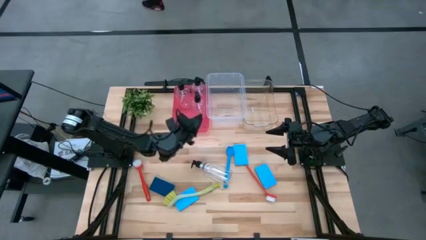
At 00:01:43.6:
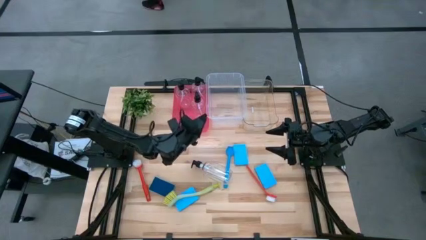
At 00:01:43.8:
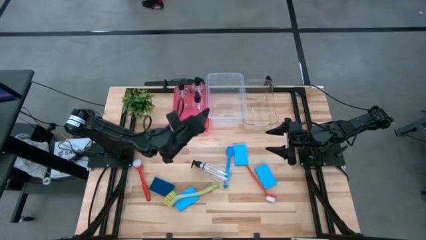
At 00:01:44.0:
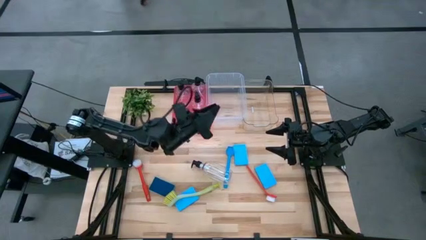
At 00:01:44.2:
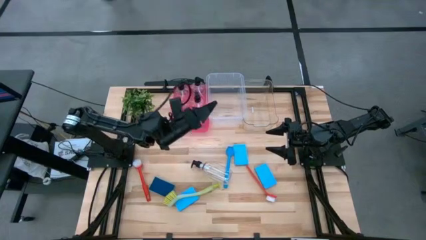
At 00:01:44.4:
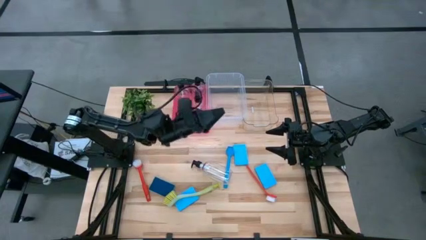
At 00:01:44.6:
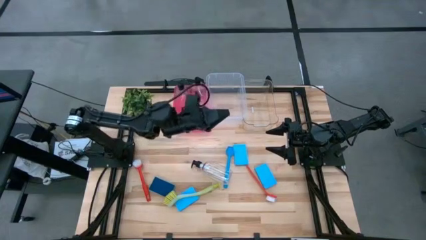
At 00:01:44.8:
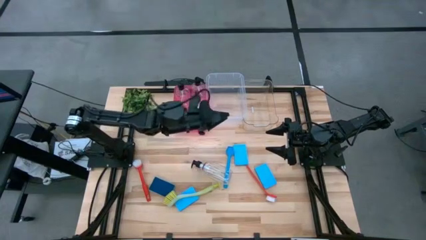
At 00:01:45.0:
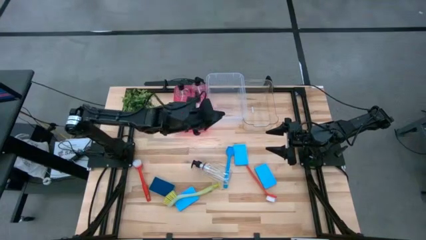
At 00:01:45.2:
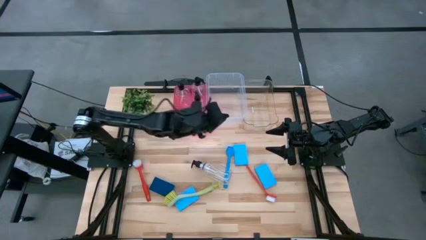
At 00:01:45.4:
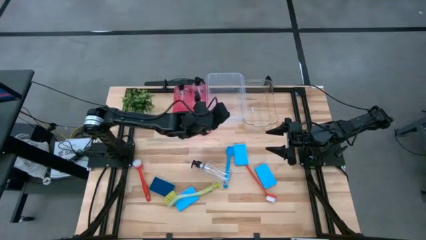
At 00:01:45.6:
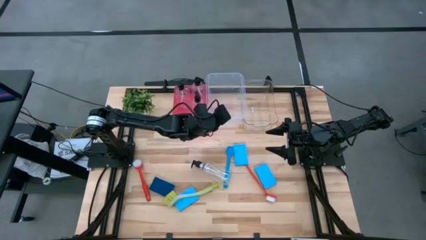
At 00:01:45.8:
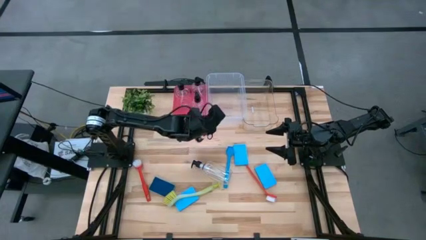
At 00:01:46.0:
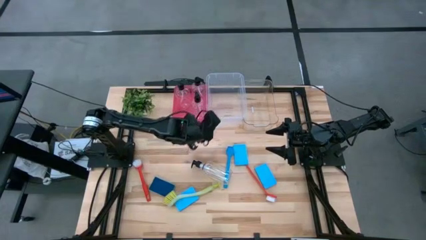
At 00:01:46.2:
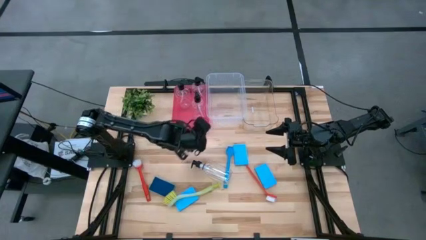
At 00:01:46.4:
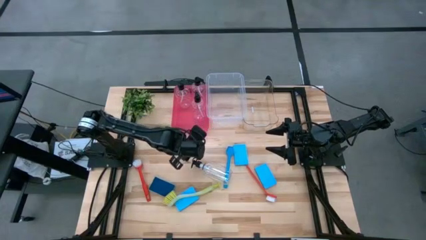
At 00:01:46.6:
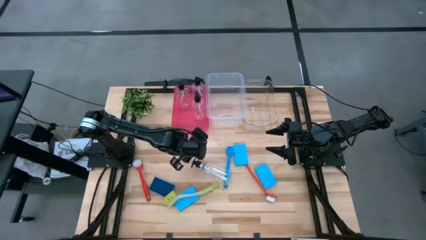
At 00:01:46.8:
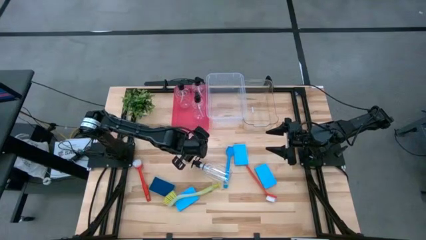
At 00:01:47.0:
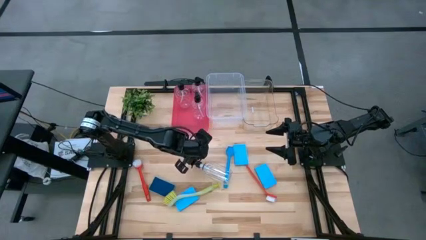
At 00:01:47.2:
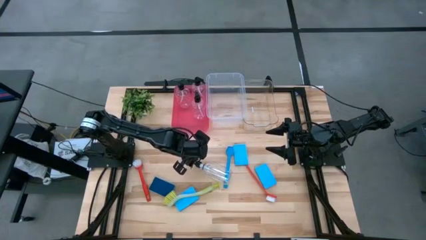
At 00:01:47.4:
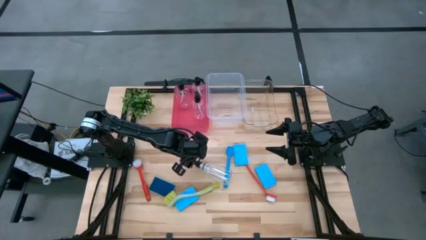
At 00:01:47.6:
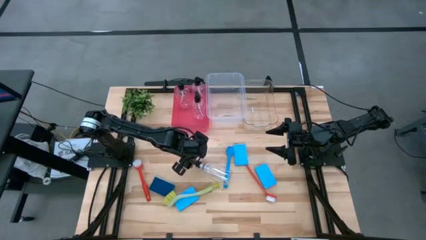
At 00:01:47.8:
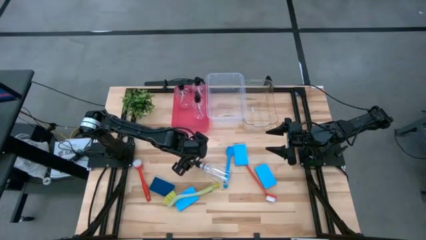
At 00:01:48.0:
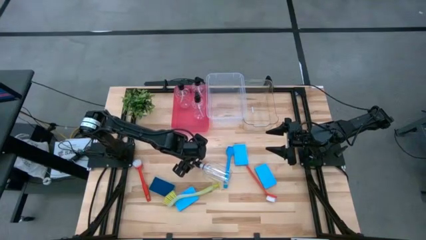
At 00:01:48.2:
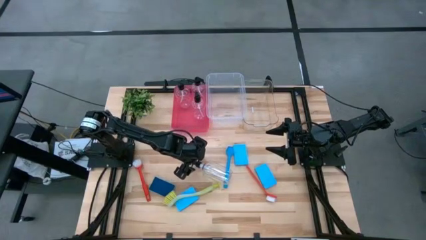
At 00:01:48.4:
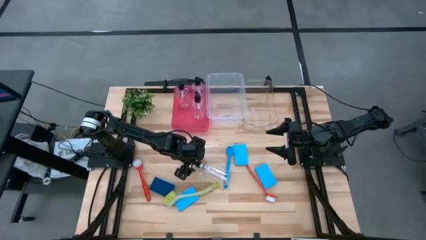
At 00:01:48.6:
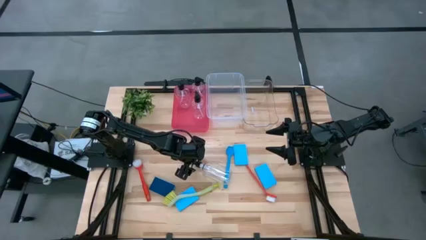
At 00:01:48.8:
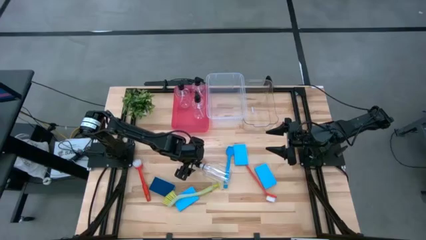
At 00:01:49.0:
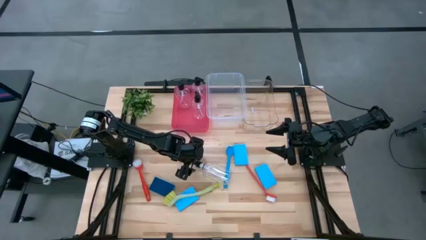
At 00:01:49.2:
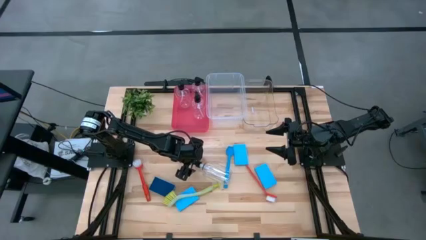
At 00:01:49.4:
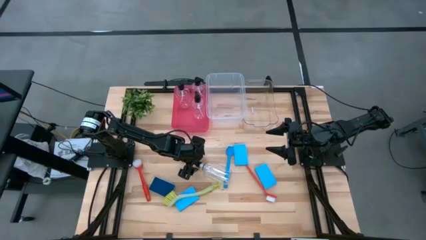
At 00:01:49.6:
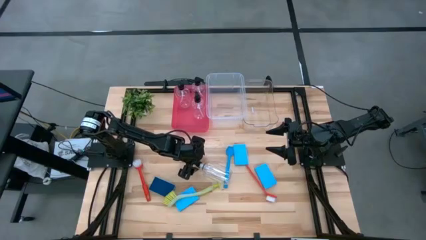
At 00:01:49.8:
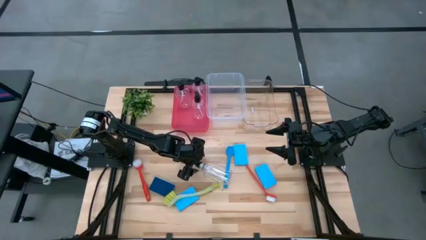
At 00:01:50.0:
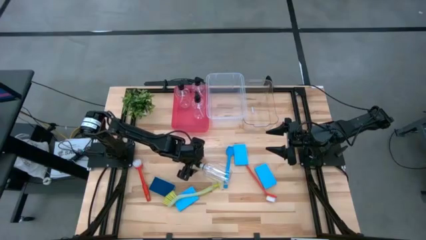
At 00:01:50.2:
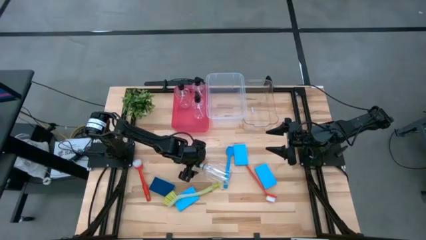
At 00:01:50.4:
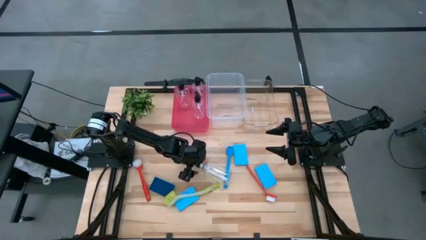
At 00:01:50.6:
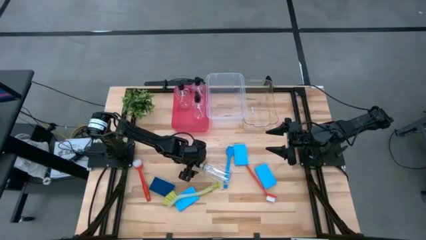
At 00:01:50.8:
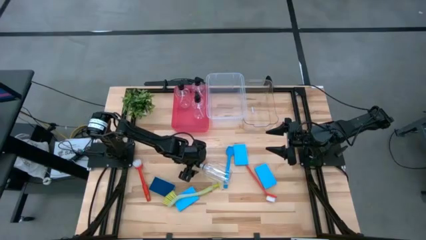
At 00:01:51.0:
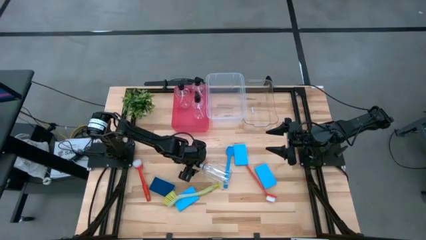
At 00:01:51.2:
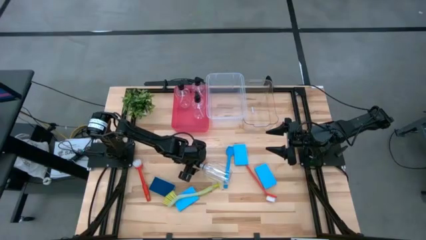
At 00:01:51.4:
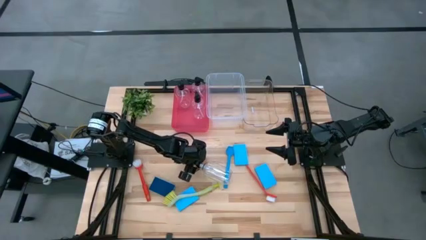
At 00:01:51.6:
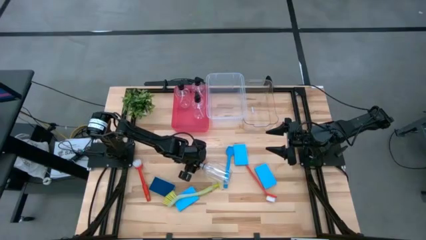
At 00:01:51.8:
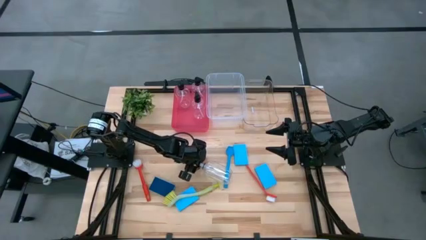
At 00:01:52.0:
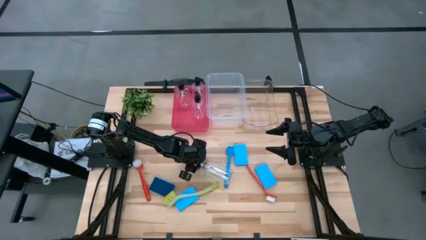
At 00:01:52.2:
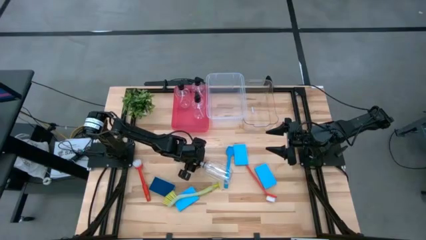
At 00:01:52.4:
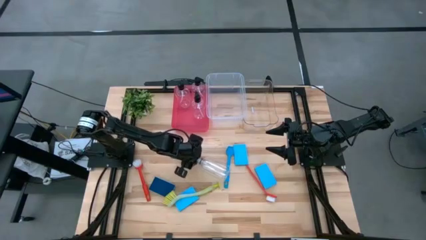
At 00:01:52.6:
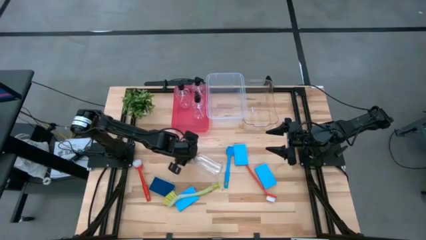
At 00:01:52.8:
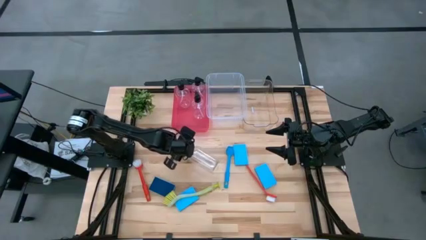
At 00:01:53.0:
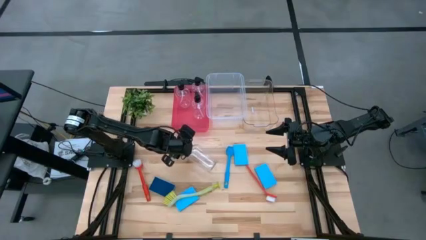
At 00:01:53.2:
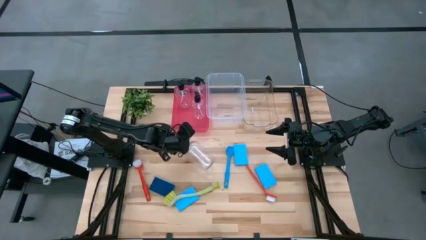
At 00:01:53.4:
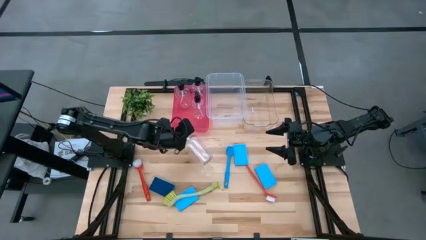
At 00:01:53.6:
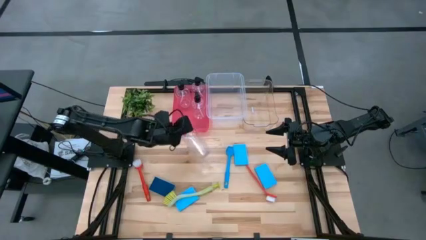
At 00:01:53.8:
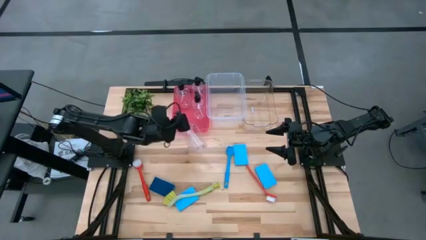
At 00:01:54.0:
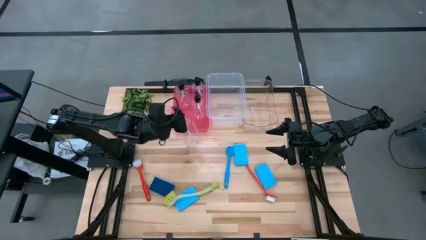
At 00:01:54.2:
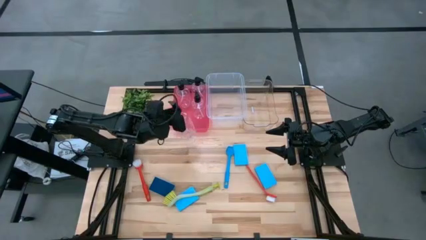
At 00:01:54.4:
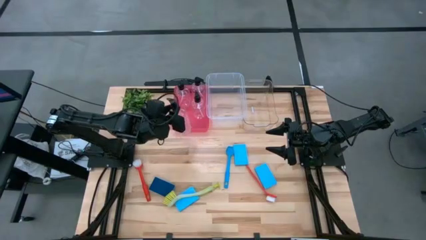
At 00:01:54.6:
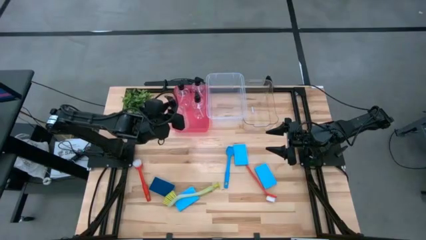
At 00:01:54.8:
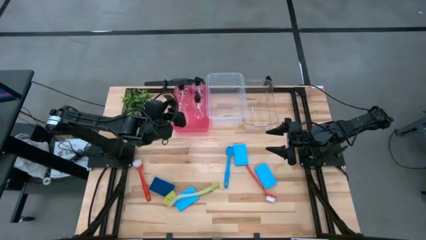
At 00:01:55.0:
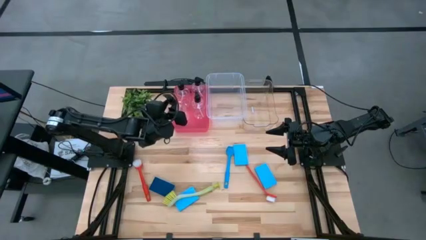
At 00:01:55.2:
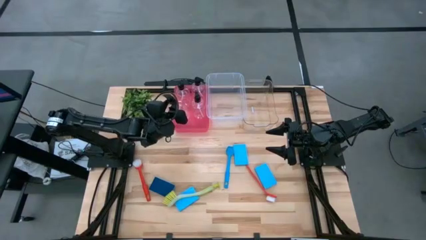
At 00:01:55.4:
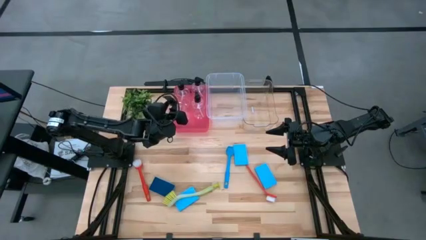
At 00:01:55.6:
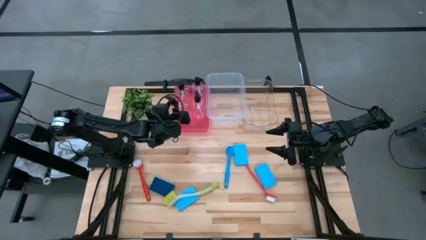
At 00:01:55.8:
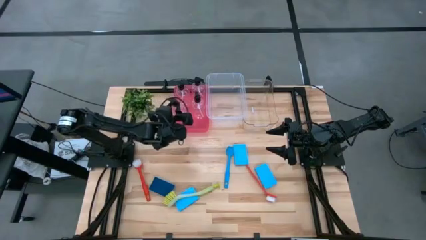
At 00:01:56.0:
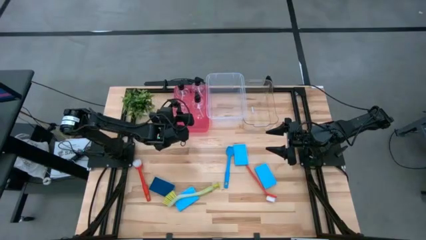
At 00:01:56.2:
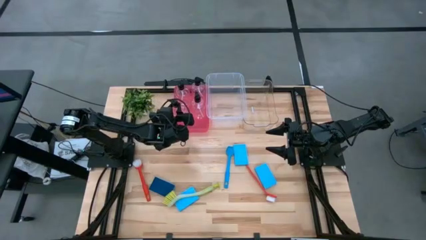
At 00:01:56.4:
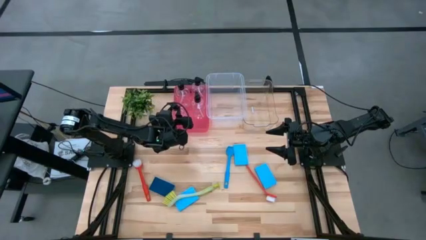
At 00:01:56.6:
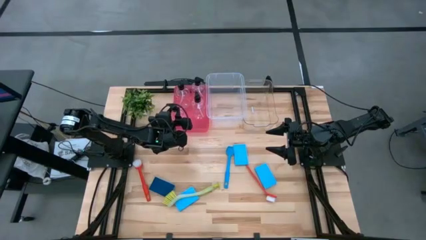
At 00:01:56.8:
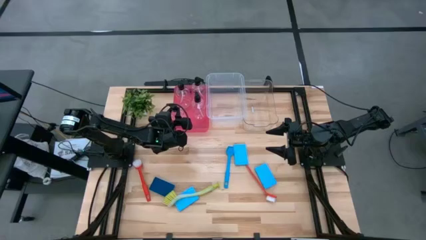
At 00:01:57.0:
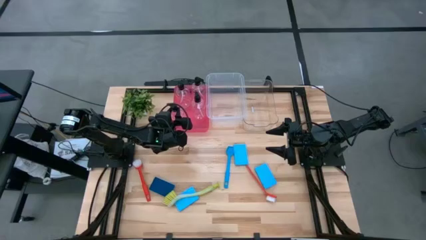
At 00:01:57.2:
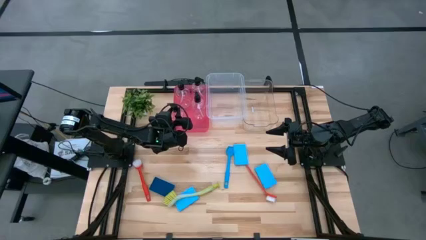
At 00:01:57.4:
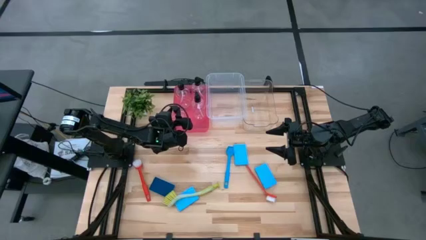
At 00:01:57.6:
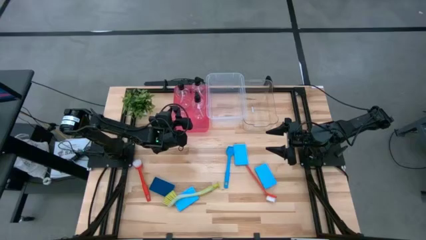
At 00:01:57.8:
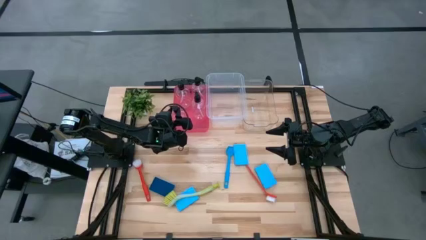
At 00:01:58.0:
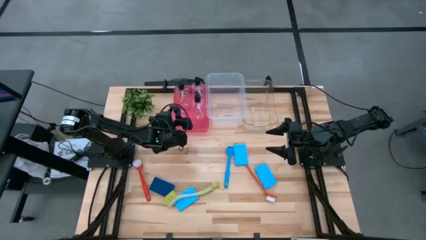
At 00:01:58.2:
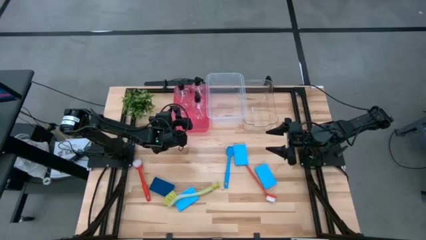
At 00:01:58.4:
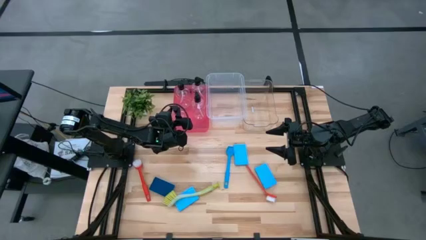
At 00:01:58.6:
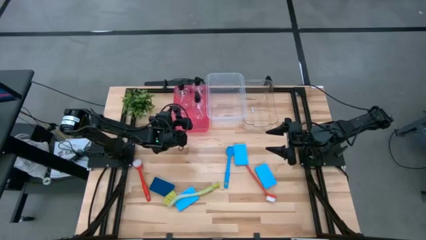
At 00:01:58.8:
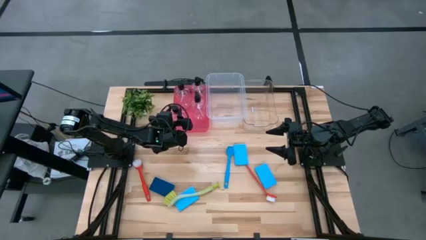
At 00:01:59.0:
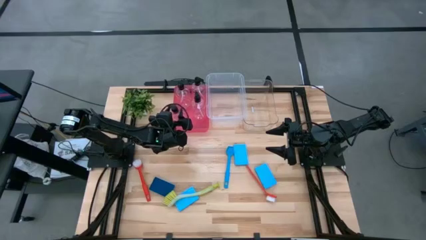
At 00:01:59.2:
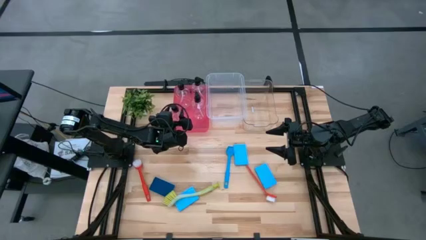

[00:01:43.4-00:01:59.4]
Task: Pick & Place Kitchen Sink Supplies
Put the transparent dishwashing liquid dispenser into the red bin
